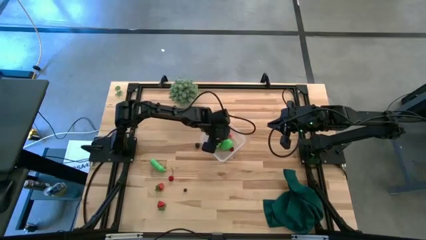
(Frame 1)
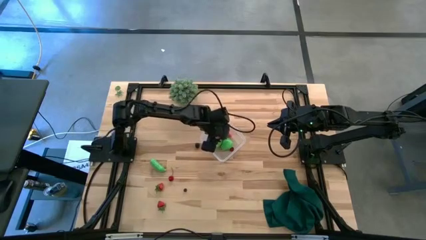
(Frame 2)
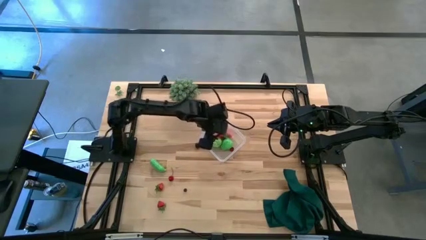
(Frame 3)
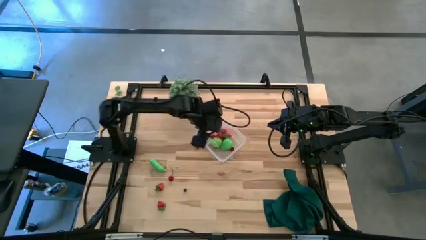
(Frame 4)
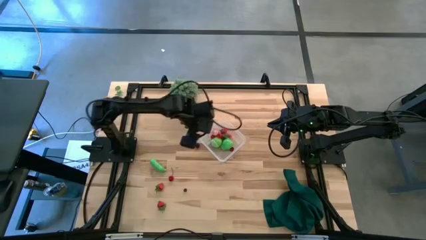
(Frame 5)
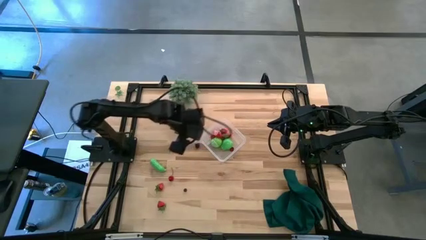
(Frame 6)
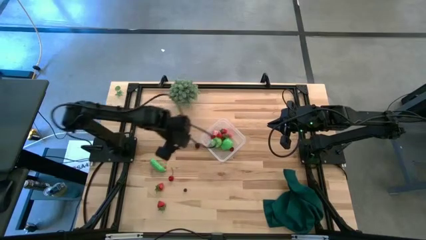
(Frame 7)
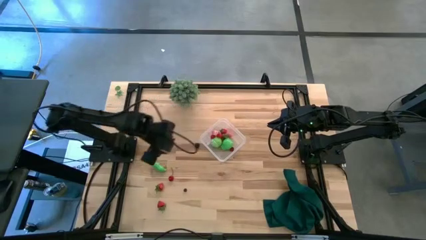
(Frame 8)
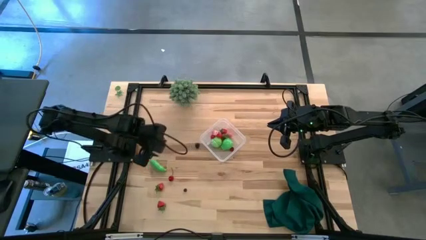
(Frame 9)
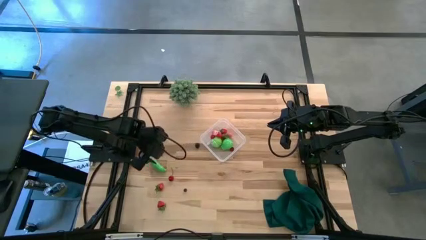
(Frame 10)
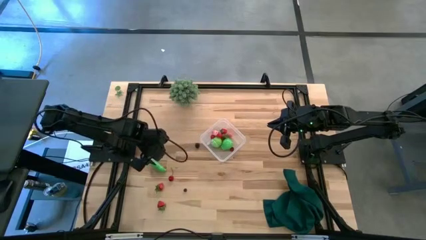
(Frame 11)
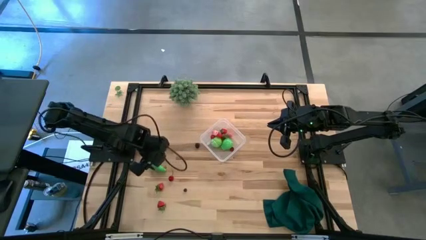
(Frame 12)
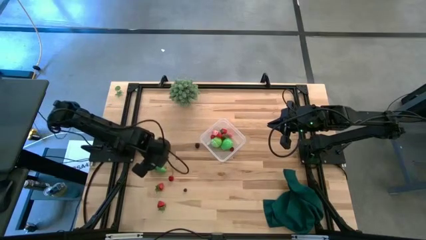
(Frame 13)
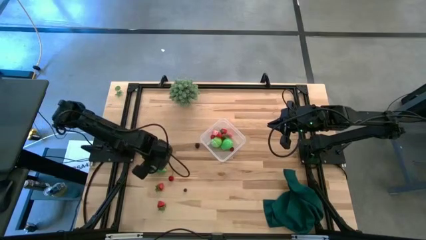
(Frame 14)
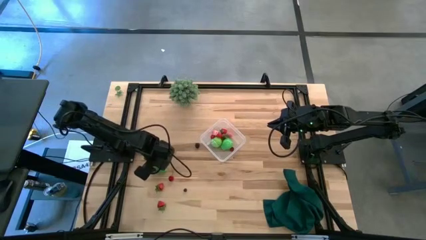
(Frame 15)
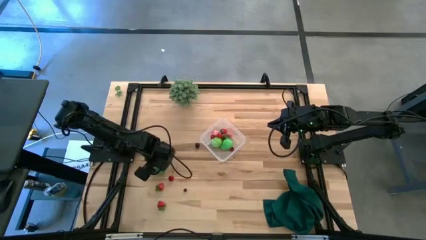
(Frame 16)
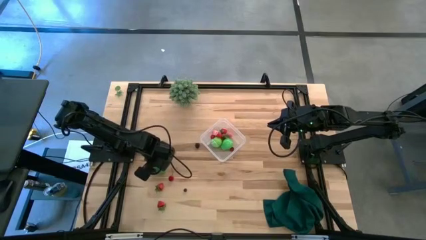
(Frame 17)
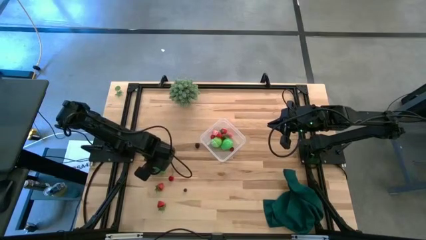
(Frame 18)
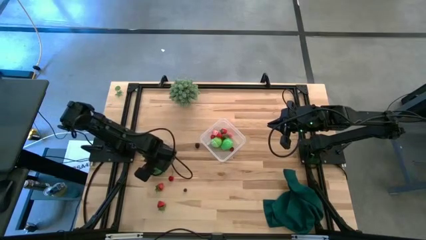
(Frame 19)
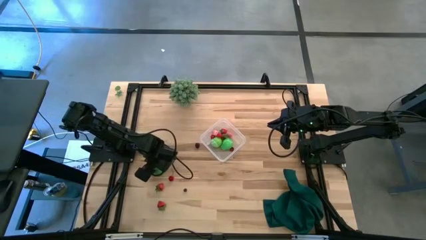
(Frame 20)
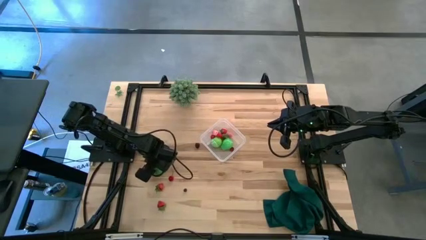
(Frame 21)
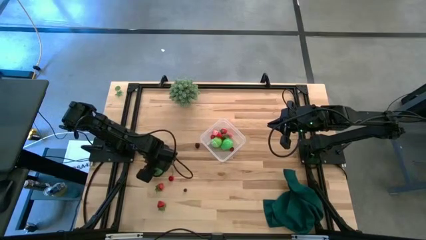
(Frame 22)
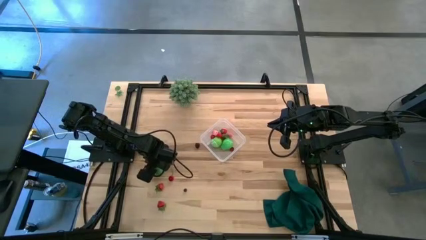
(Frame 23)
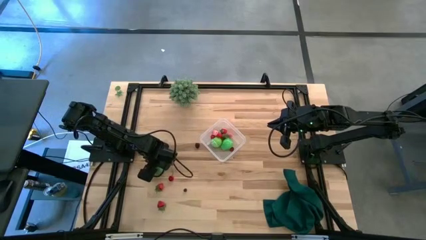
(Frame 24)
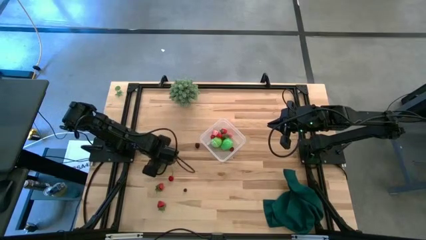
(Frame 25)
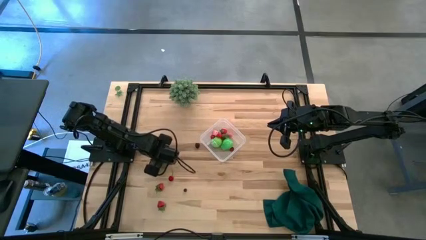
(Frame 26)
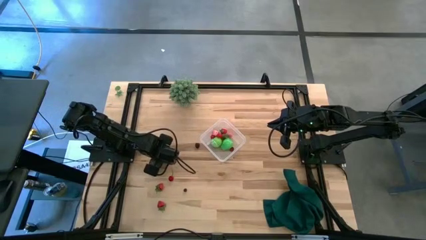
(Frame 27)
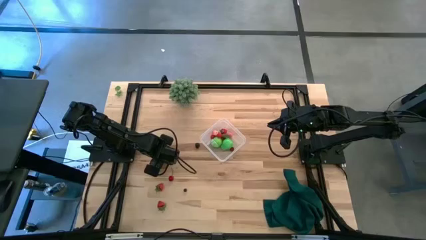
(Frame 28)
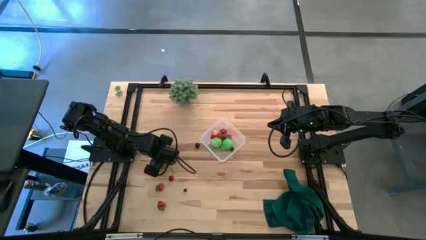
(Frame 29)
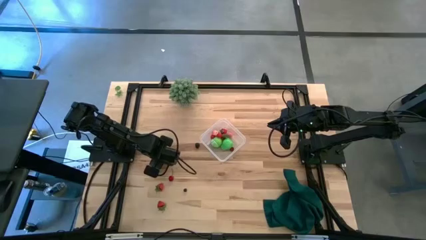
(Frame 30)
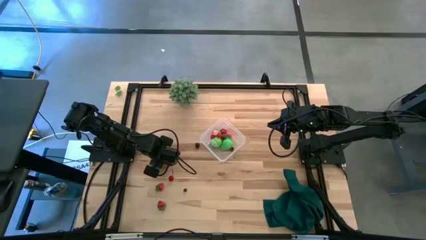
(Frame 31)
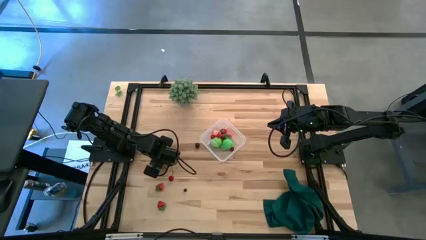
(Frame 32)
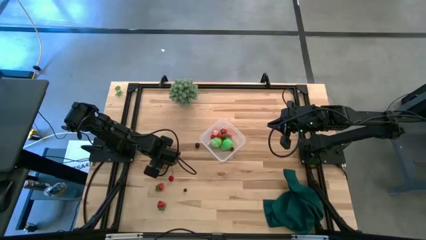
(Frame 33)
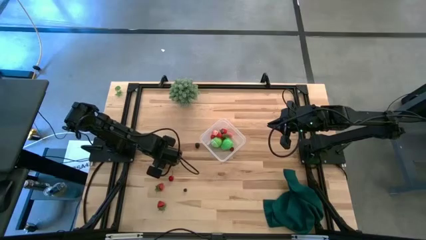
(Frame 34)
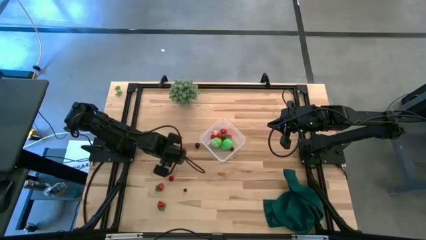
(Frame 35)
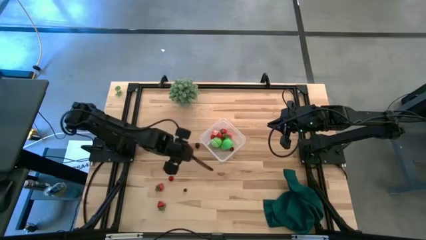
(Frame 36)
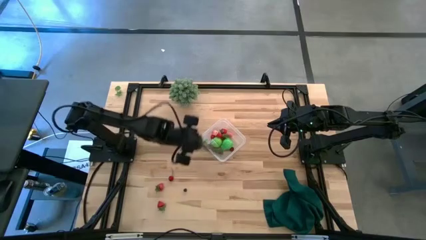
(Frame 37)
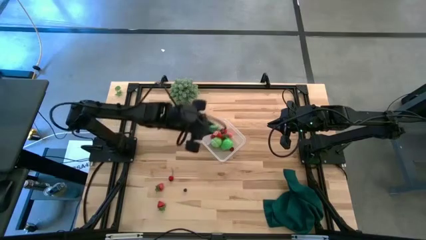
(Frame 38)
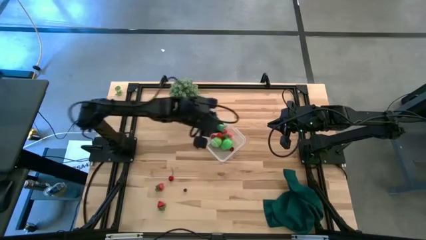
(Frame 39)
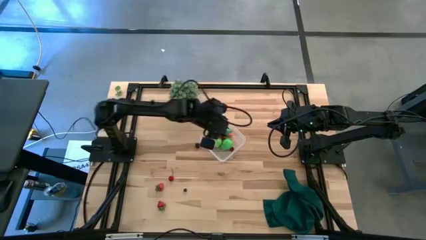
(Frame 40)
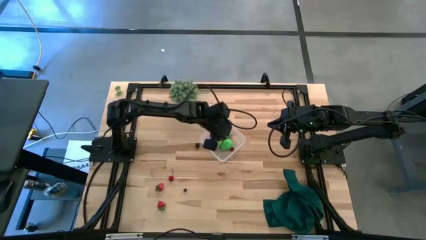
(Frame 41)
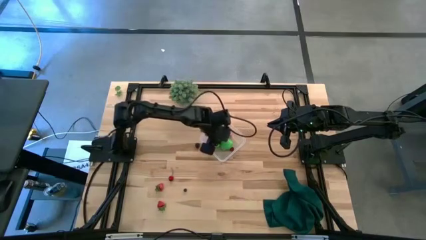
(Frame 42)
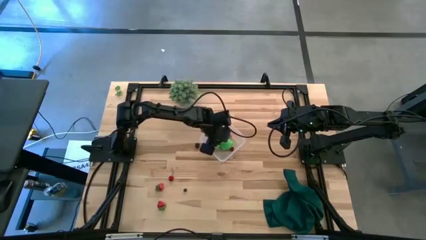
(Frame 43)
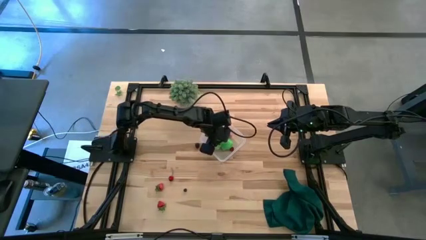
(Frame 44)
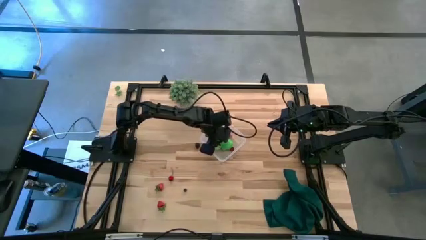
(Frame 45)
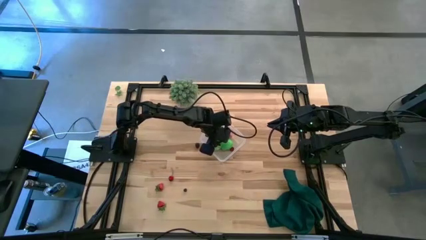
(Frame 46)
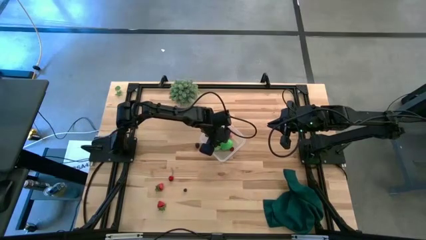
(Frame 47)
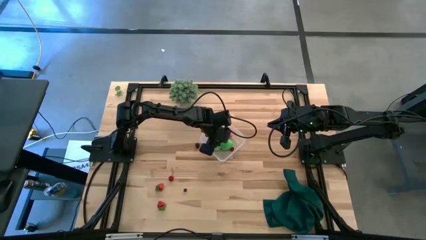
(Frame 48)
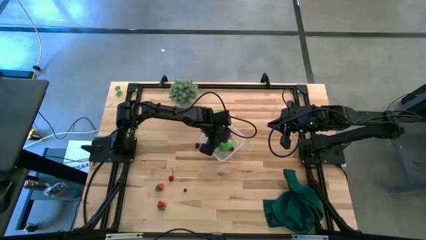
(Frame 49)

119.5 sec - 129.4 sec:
Task: Pick and placing Produce into tupperware
Put the green peas into the transparent bin

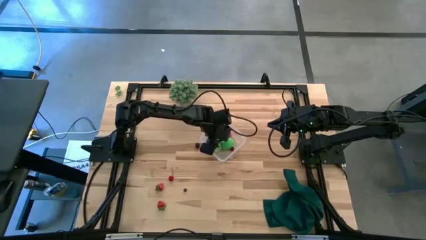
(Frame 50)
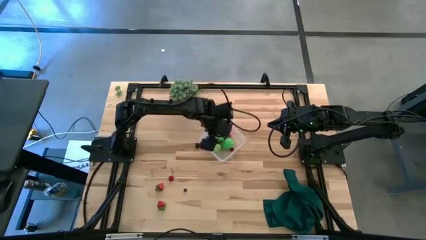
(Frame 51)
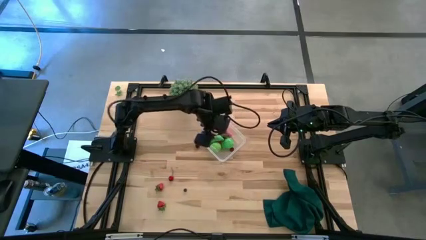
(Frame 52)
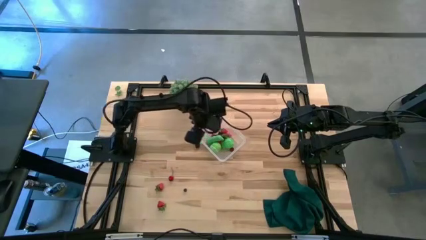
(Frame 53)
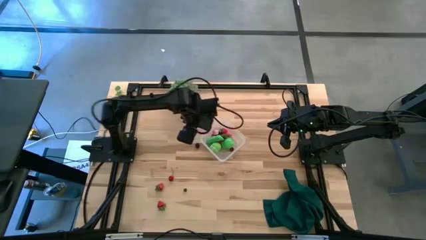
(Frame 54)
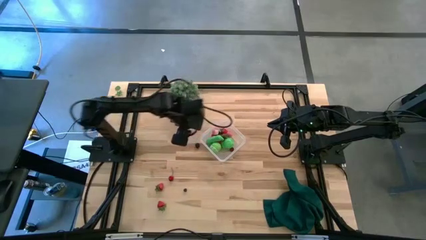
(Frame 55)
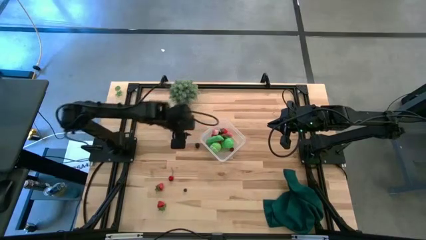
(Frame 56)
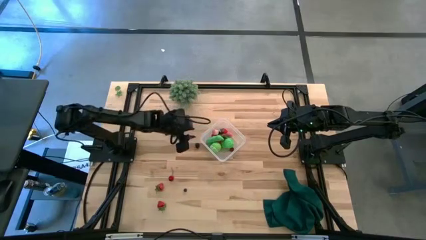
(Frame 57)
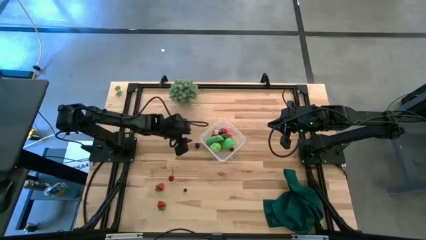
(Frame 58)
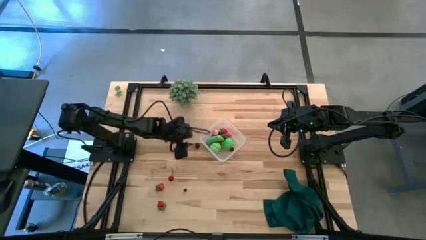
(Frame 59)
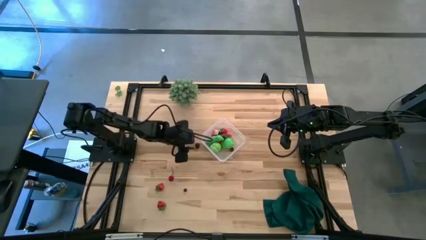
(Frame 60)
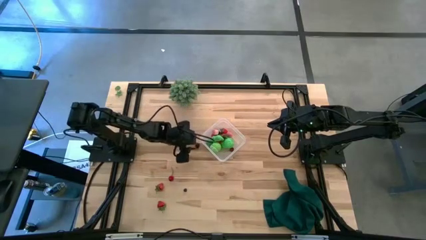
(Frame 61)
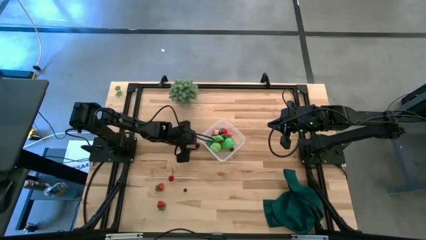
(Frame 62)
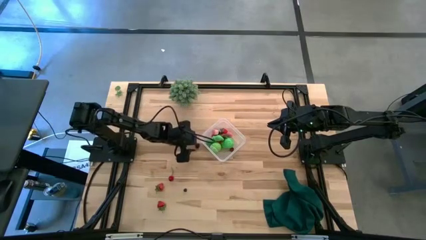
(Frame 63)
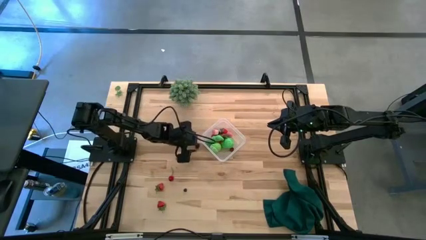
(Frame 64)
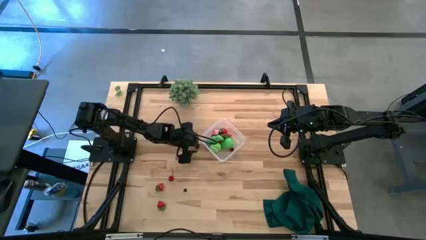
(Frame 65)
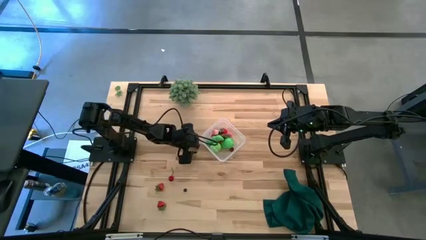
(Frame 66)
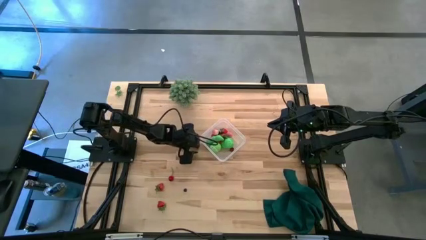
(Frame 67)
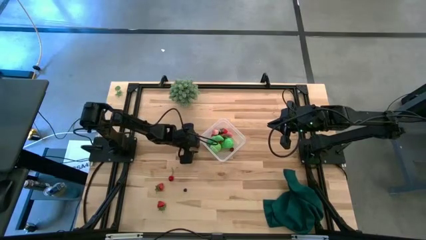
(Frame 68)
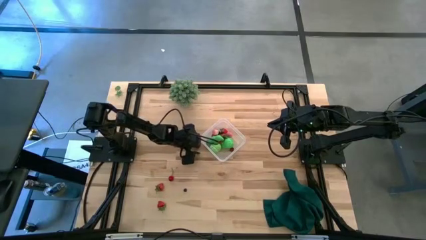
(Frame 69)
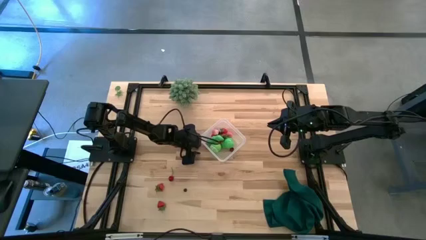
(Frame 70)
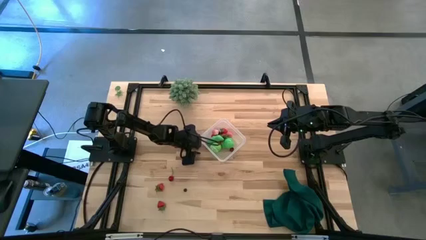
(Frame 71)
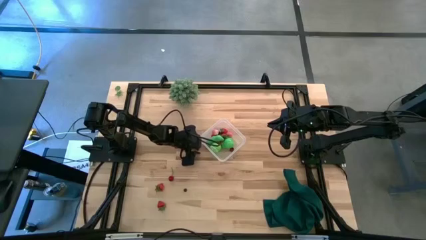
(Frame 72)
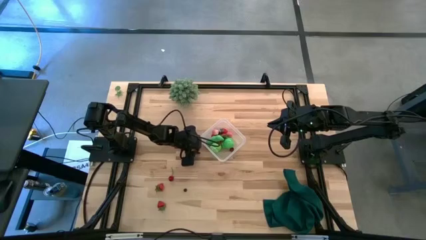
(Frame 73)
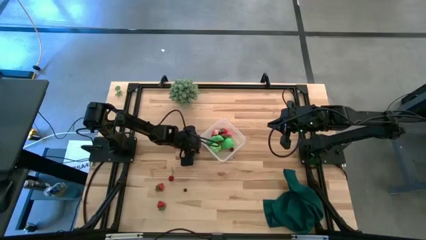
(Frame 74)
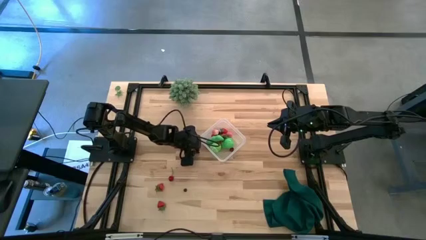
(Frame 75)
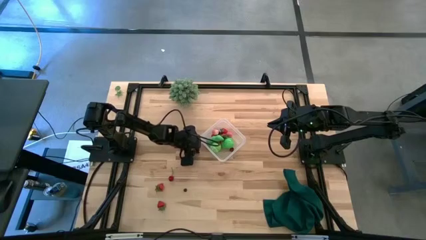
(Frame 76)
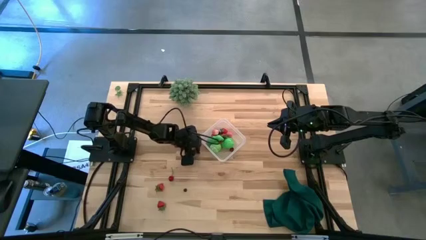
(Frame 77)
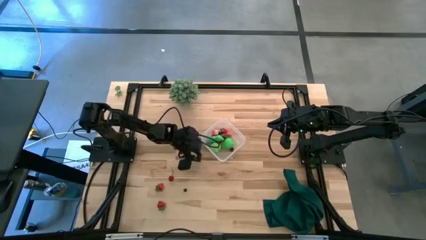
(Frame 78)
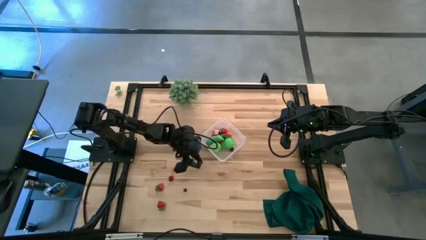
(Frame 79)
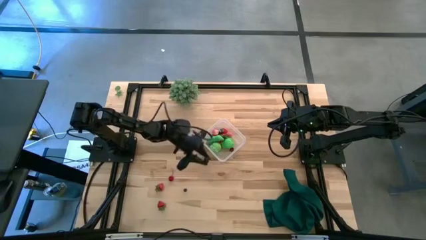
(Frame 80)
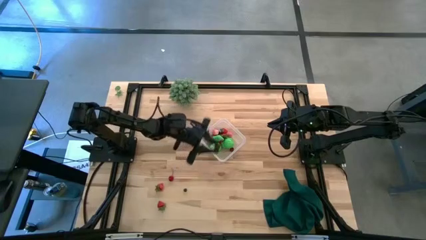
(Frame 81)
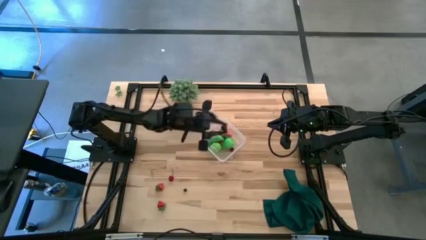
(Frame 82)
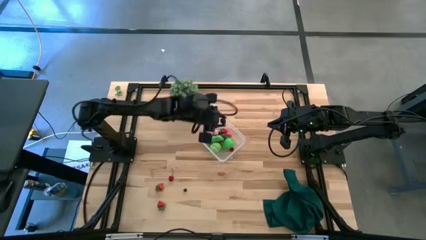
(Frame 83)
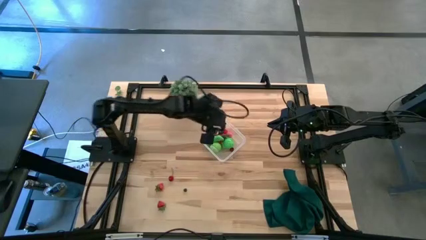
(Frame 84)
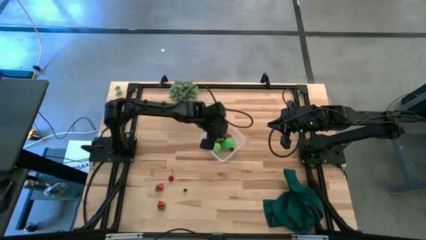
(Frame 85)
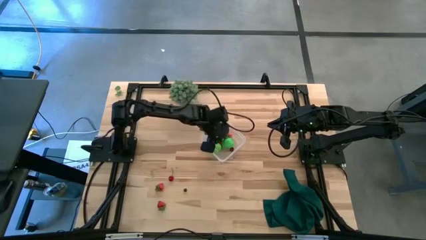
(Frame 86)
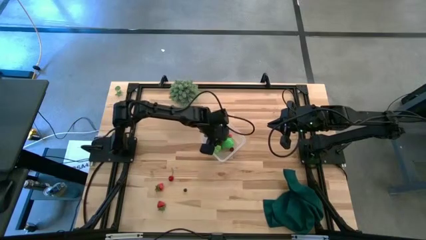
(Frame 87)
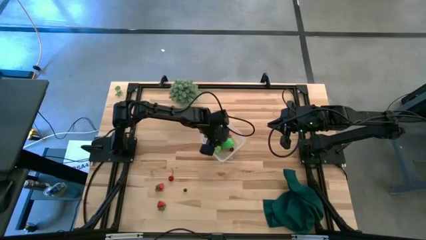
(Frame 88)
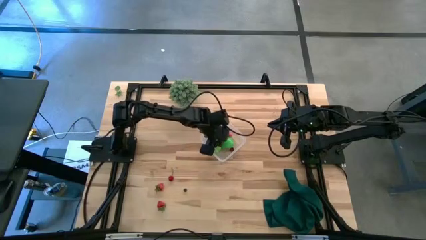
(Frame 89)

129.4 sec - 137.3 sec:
Put the black raspberry into the transparent bin
